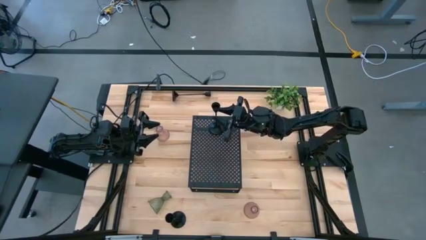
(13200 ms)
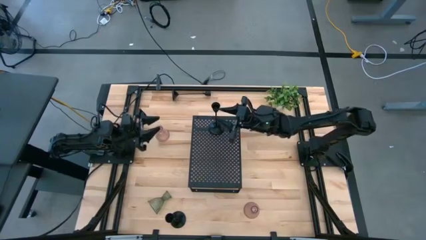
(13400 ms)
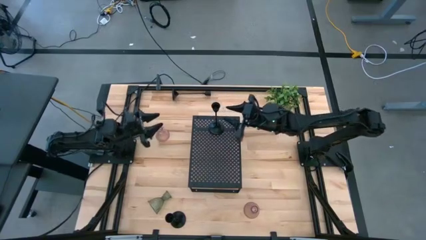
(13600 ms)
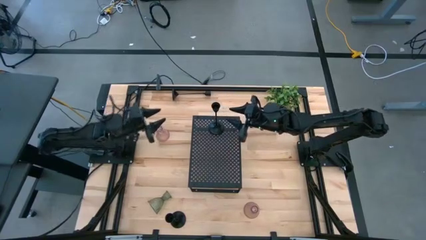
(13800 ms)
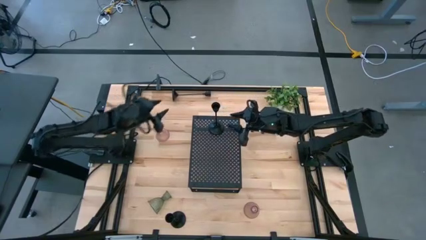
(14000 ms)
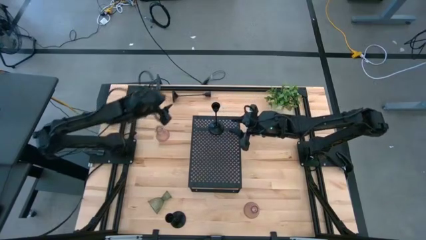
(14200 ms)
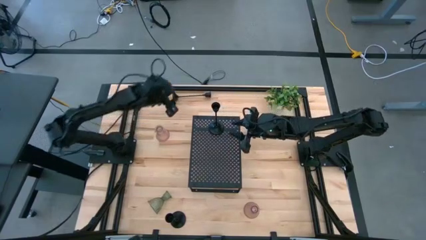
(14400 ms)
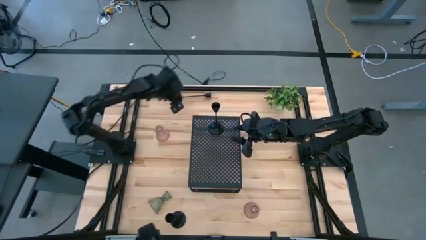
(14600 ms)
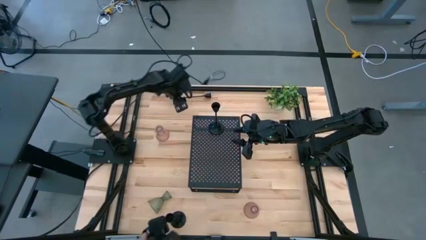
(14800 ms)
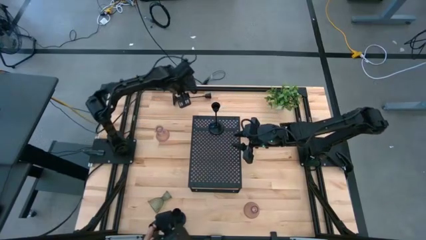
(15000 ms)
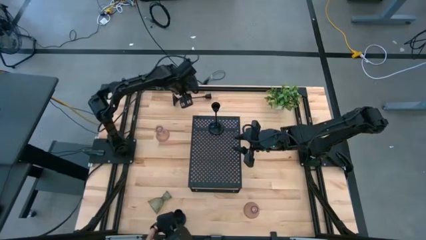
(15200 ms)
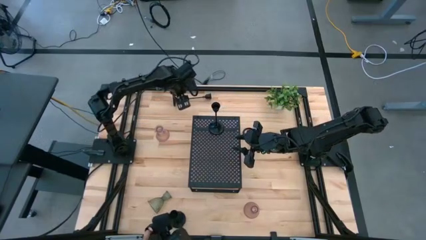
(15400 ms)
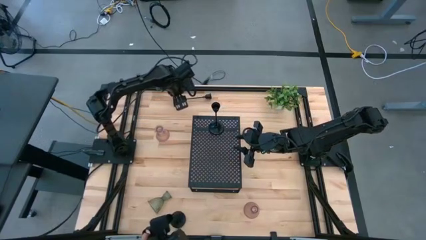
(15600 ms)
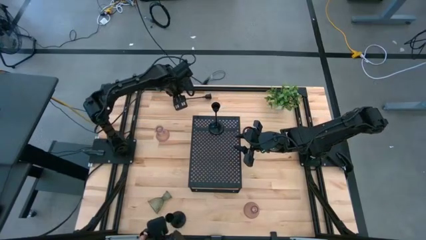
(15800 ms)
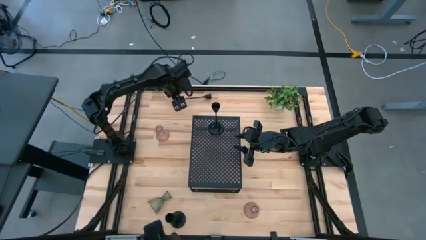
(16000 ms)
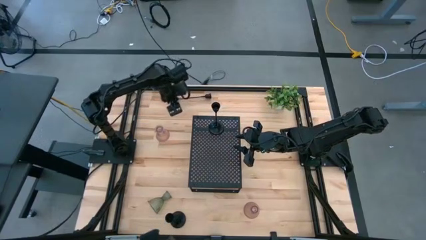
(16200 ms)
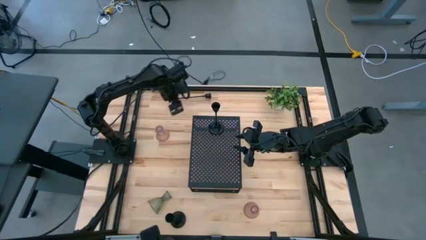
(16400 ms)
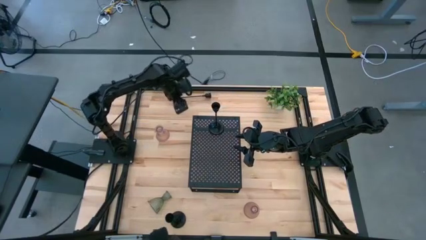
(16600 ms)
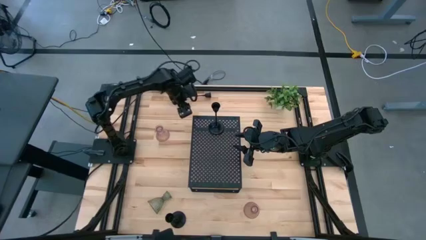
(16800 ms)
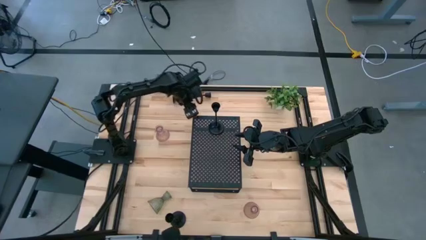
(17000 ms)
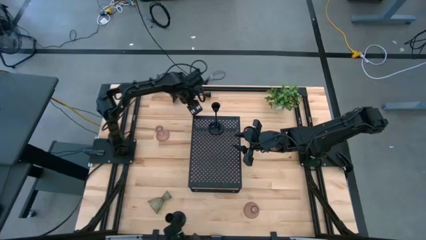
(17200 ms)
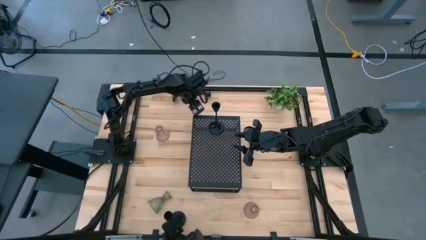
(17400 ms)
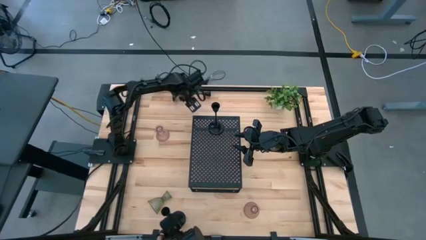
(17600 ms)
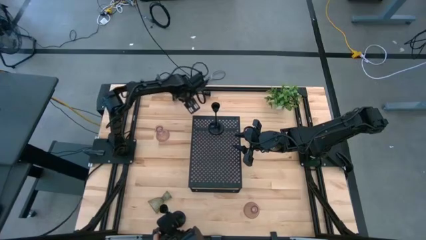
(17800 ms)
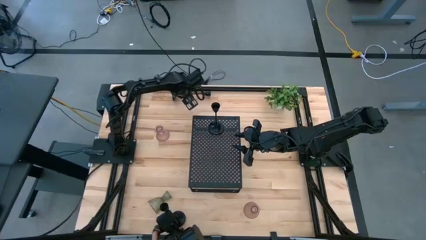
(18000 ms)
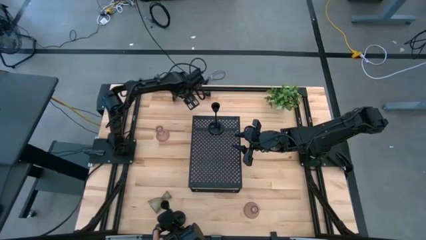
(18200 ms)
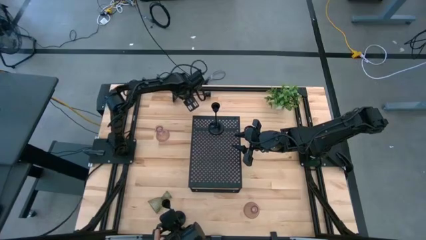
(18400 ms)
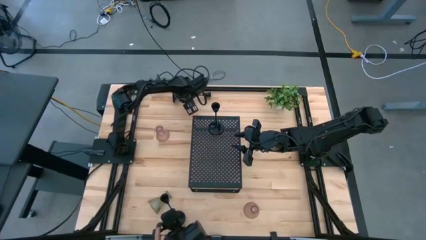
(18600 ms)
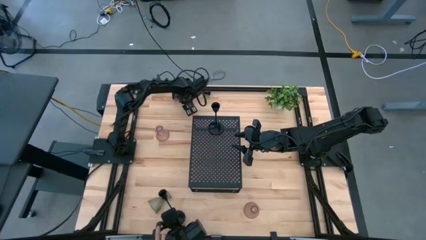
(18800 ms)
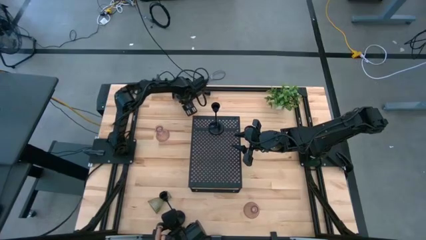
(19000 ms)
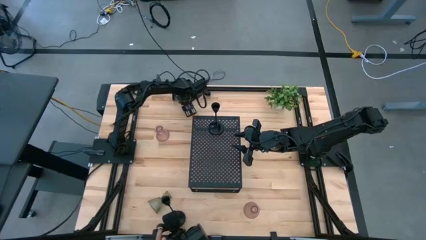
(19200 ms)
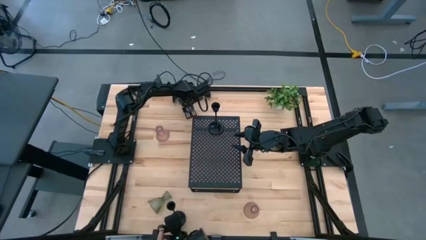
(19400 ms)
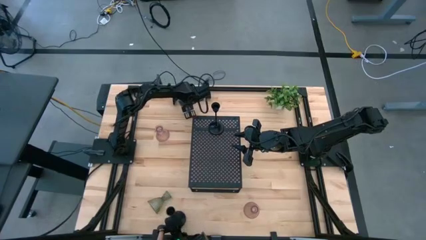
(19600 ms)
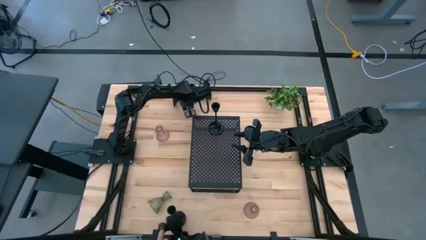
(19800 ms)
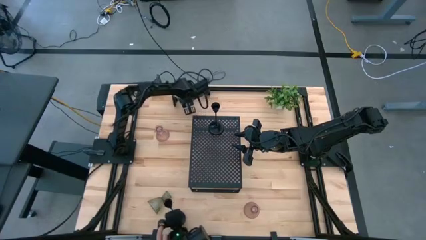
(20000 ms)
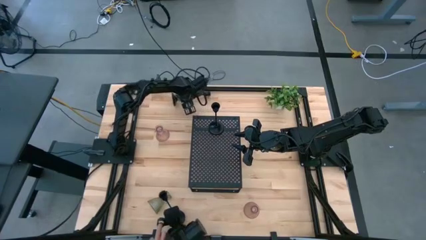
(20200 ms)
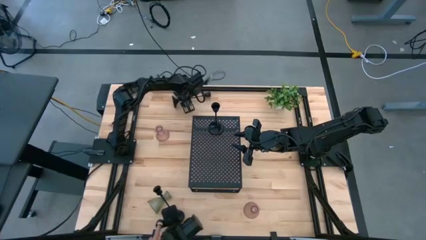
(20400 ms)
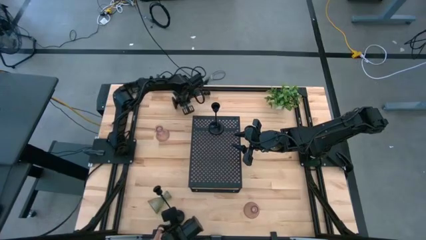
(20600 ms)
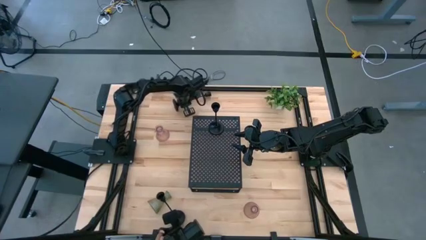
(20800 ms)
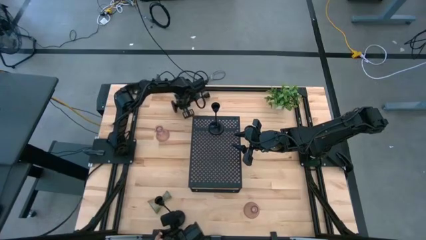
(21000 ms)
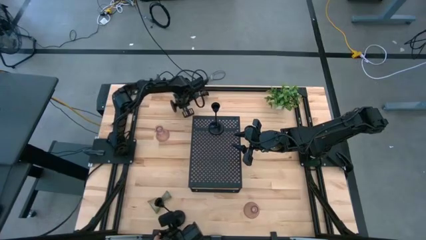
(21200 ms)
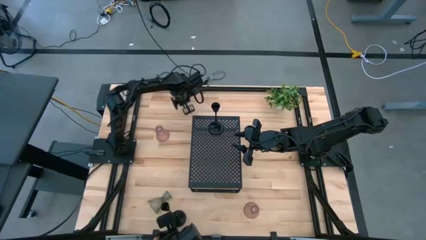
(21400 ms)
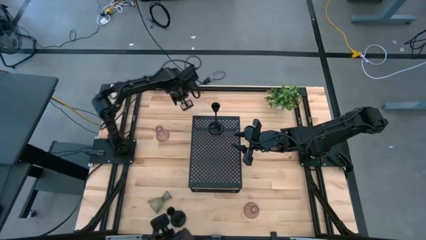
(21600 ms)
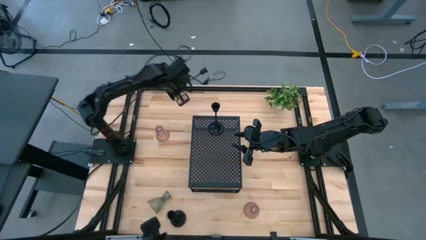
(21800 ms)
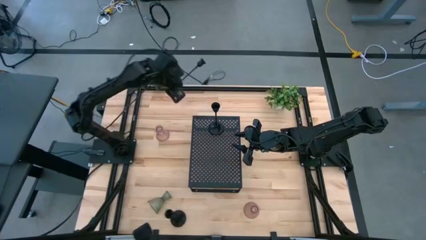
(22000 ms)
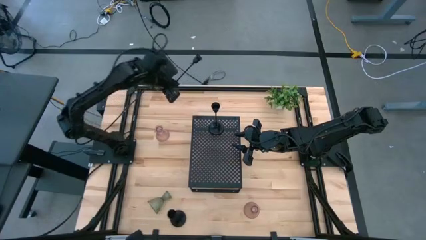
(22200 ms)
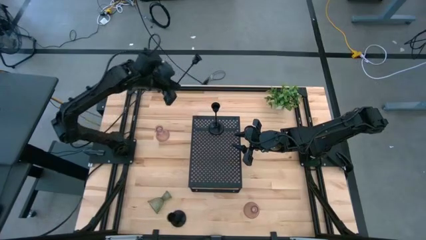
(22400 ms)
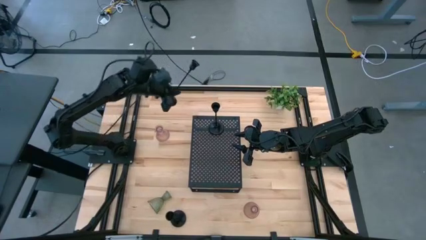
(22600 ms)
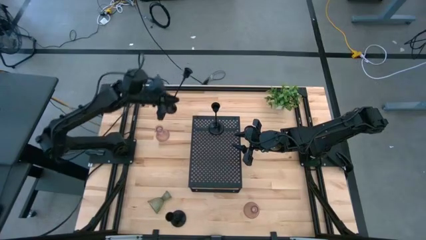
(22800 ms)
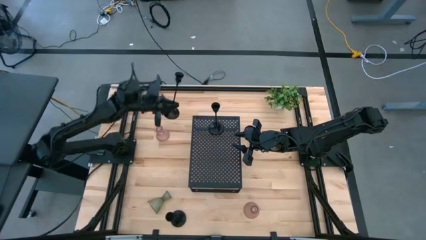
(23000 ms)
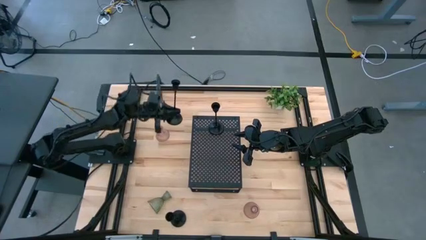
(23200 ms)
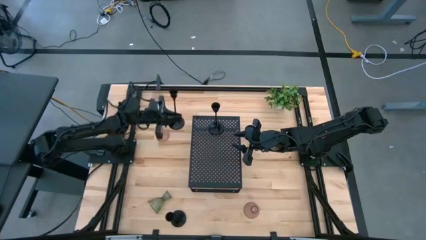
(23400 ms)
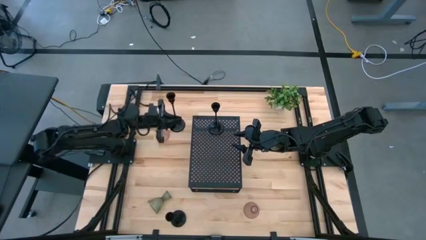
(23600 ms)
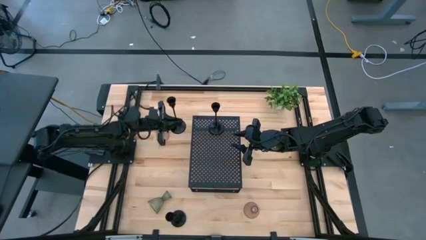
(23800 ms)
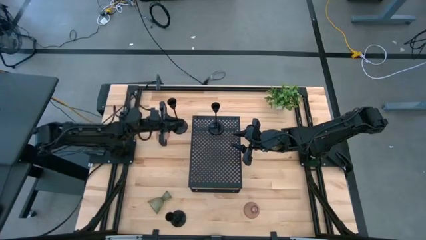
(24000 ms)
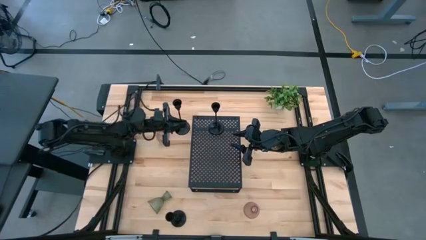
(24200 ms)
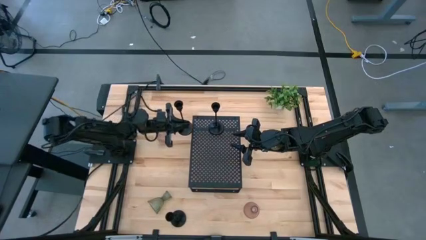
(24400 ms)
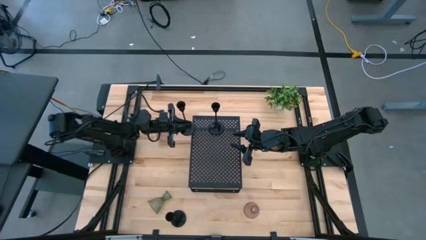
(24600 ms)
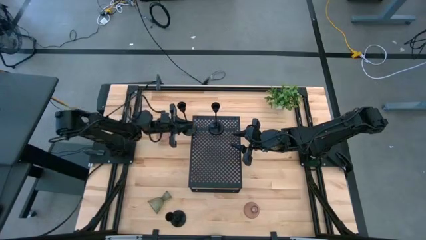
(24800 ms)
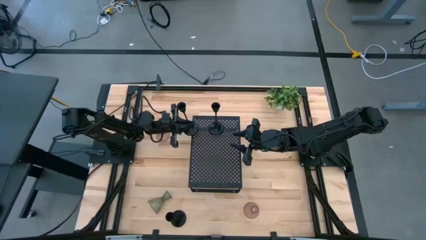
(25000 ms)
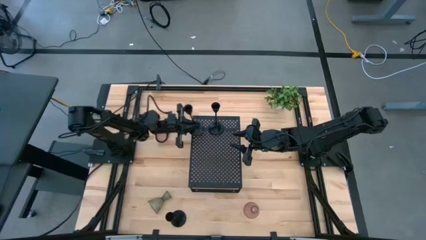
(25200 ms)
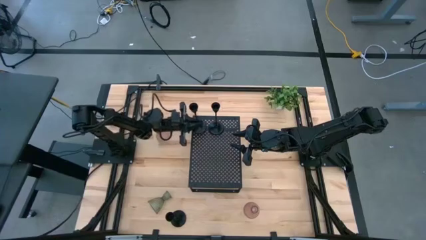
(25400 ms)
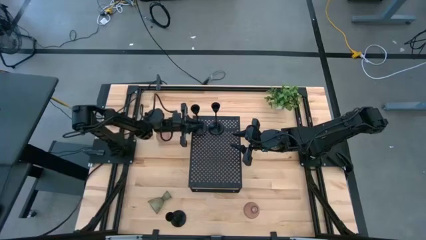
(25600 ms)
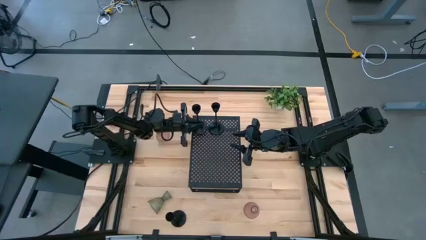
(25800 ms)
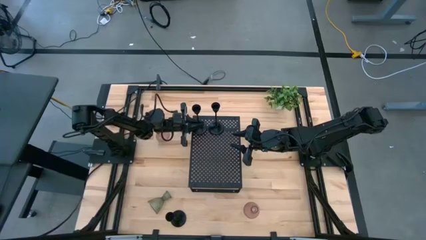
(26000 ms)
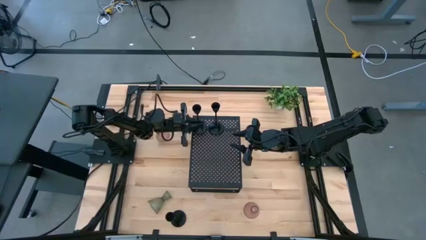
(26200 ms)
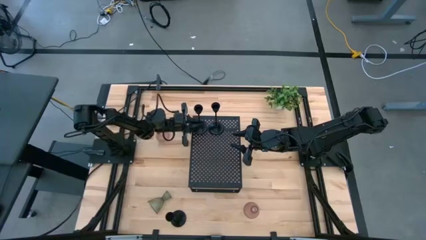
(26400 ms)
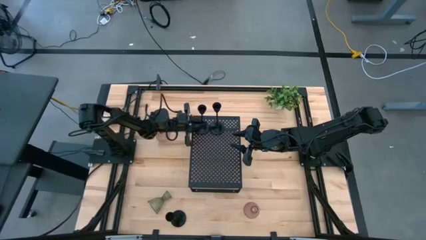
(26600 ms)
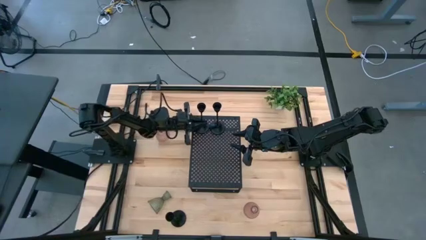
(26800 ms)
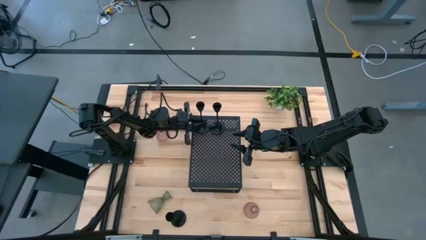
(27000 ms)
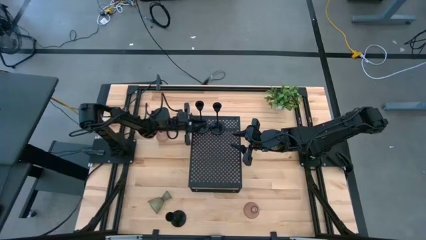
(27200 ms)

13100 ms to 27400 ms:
Task: Pick & Place candle stick holders
Put the top black candle holder on the shelf aligned with the other black candle holder

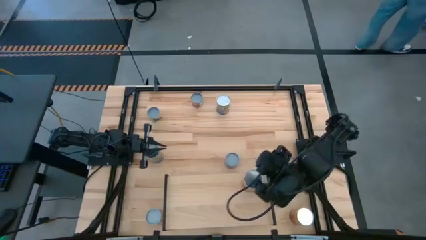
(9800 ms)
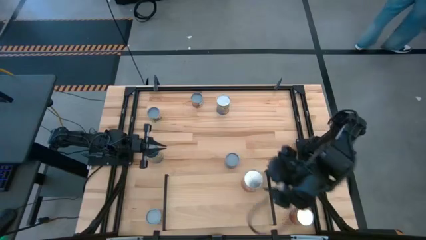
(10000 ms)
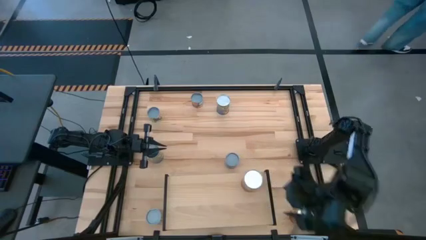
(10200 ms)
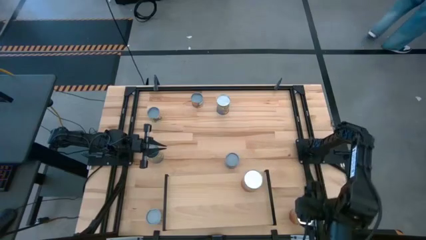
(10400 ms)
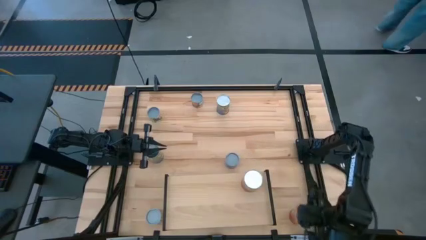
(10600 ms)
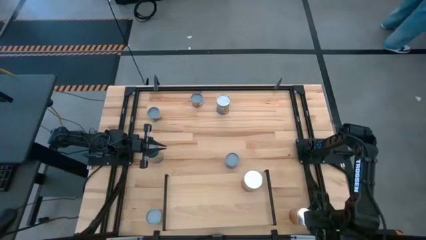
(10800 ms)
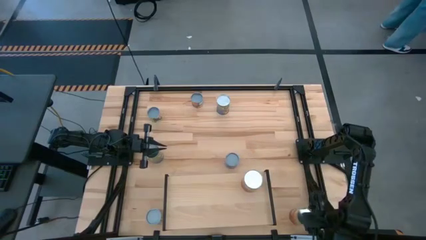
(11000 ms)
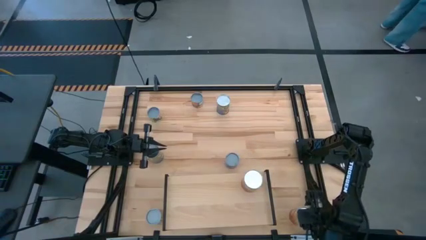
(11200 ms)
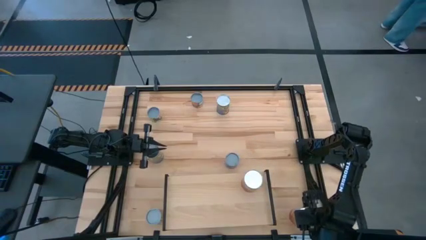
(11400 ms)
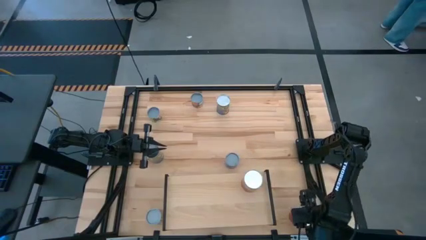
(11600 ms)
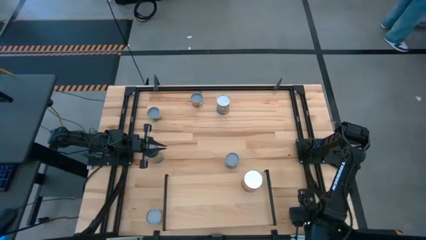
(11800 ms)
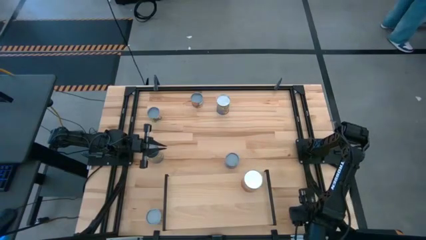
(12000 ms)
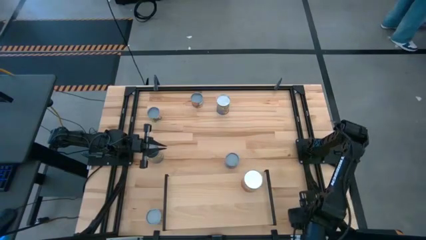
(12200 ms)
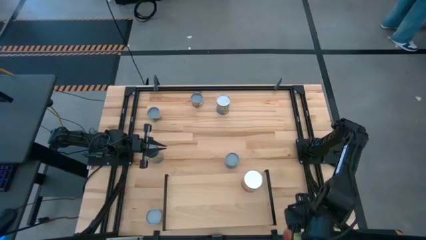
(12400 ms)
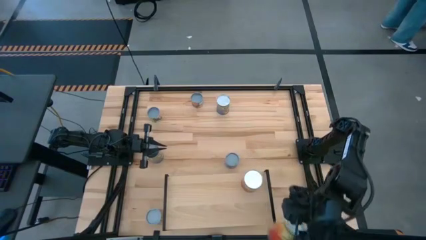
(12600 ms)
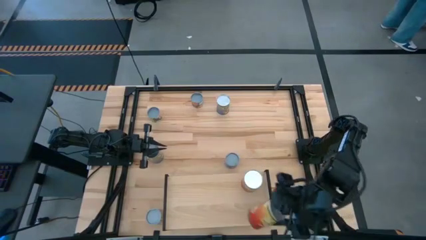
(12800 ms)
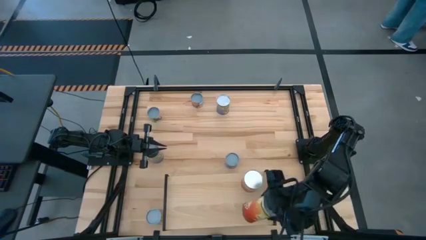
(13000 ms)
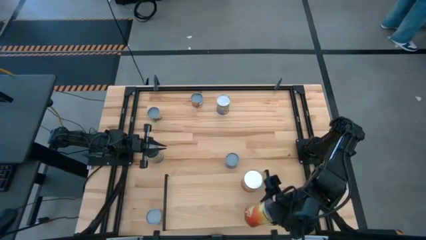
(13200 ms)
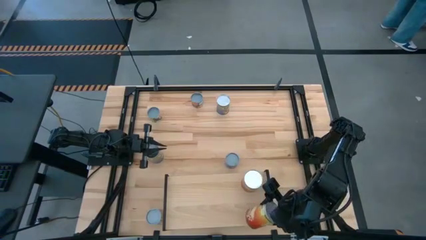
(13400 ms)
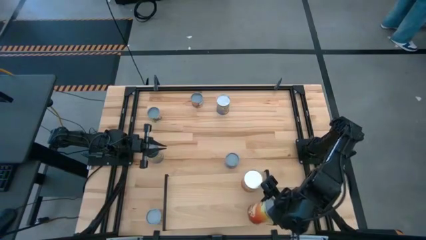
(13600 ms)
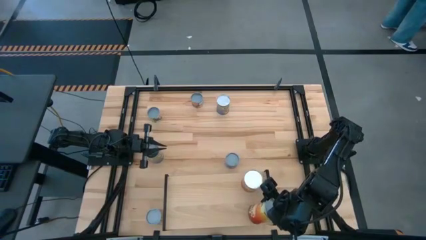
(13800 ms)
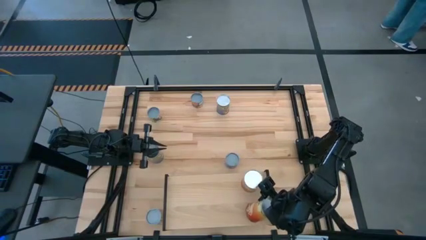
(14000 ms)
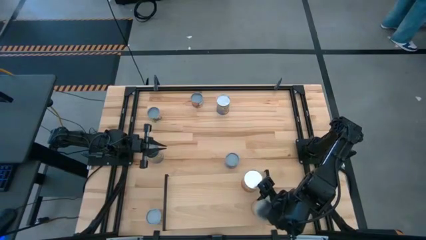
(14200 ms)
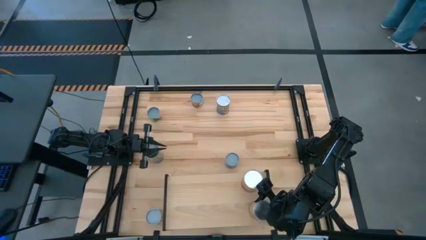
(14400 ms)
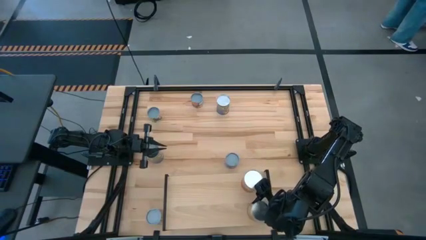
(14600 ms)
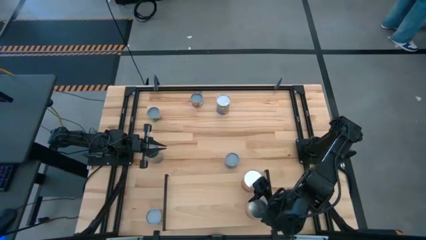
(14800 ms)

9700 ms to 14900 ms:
Task: Pick and place cans onto a shelf
Put the large canned corn on the shelf
